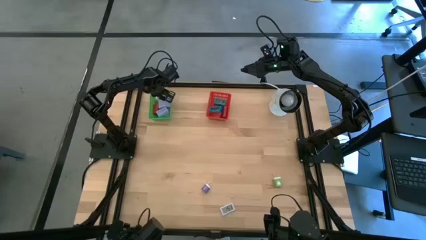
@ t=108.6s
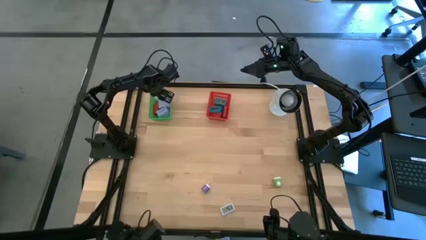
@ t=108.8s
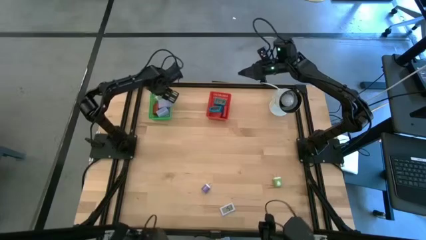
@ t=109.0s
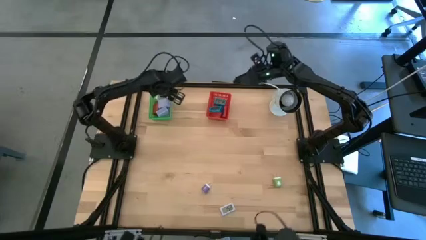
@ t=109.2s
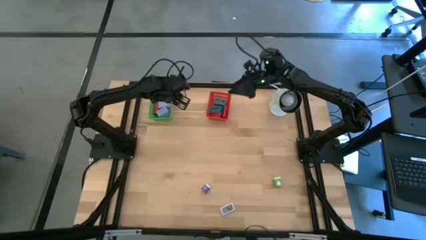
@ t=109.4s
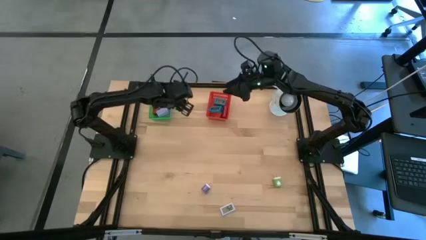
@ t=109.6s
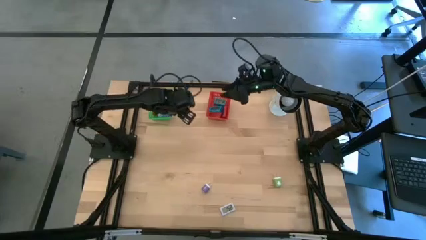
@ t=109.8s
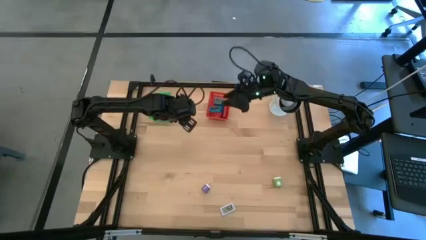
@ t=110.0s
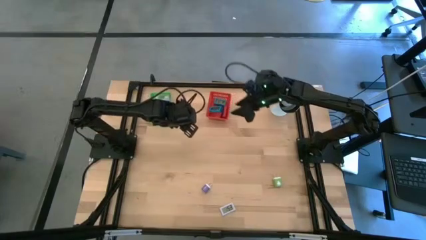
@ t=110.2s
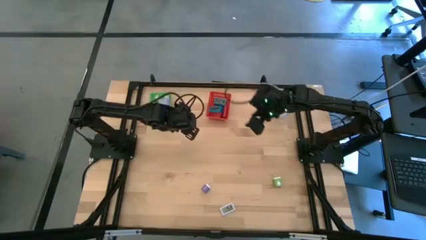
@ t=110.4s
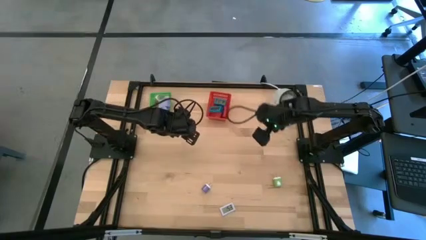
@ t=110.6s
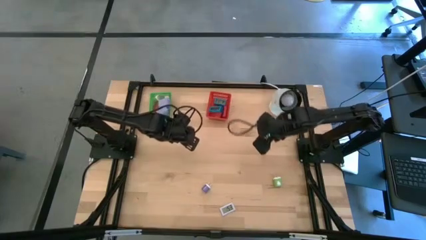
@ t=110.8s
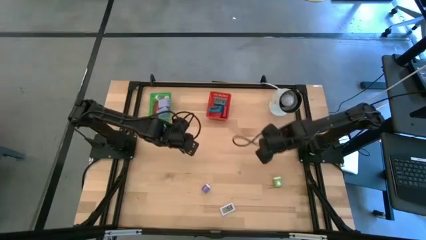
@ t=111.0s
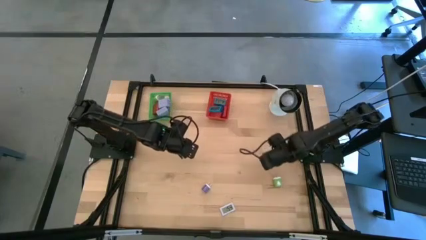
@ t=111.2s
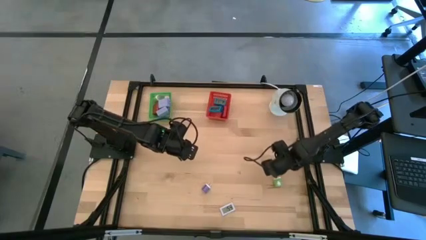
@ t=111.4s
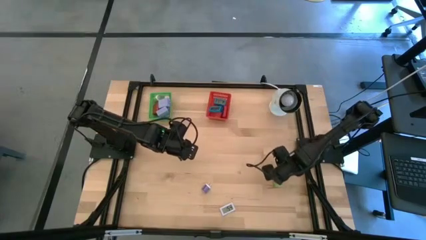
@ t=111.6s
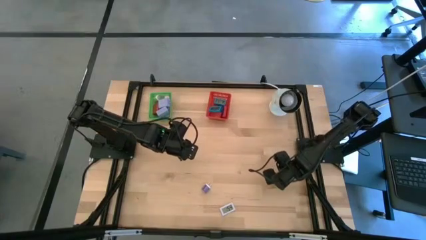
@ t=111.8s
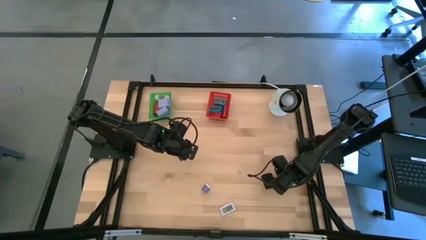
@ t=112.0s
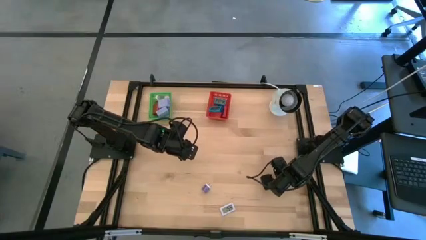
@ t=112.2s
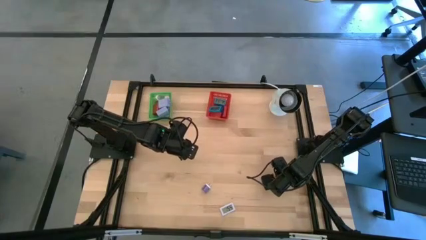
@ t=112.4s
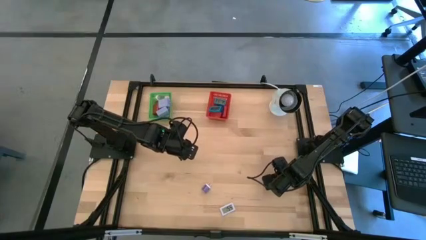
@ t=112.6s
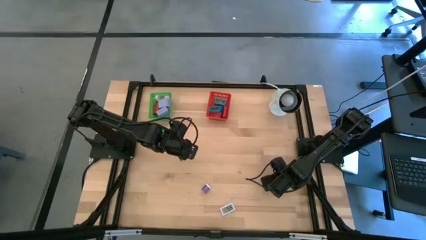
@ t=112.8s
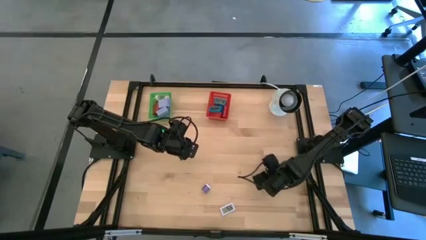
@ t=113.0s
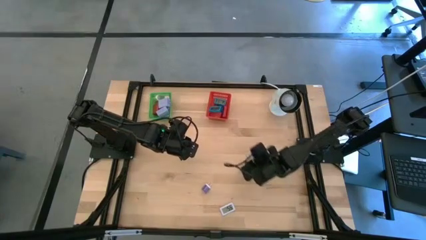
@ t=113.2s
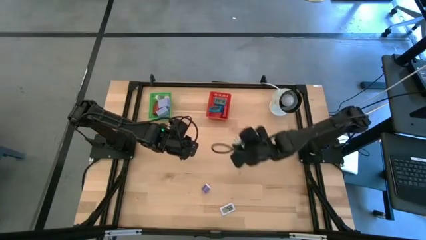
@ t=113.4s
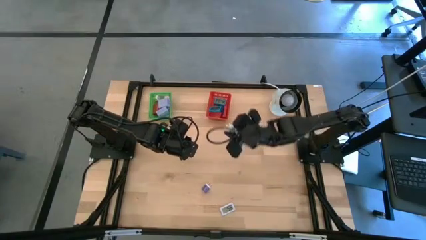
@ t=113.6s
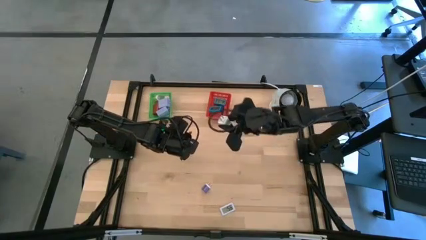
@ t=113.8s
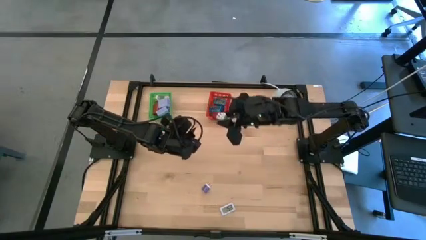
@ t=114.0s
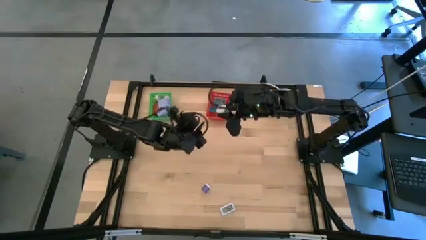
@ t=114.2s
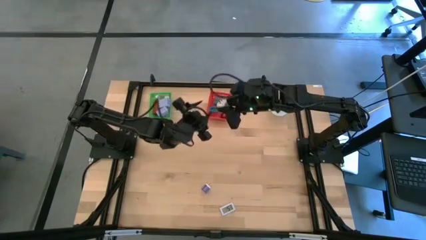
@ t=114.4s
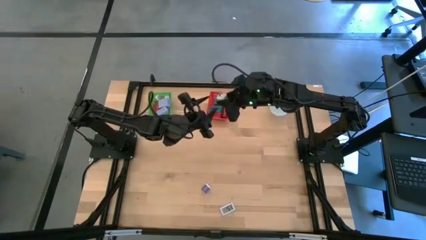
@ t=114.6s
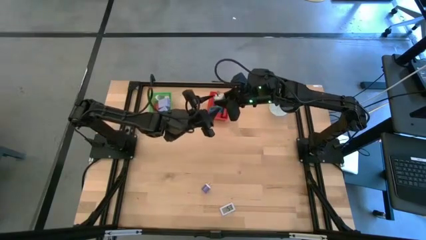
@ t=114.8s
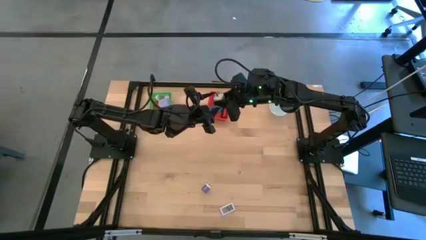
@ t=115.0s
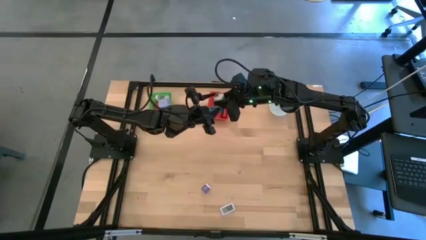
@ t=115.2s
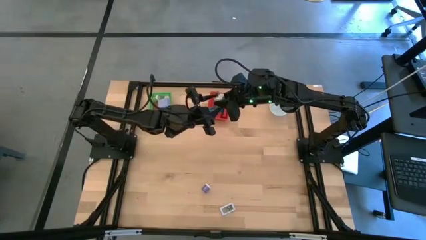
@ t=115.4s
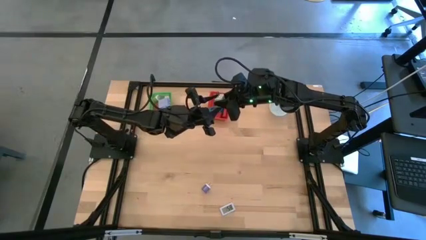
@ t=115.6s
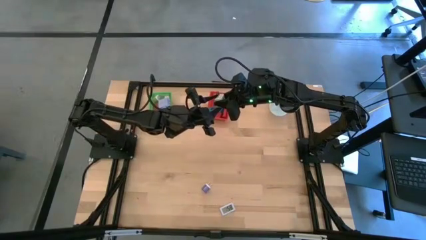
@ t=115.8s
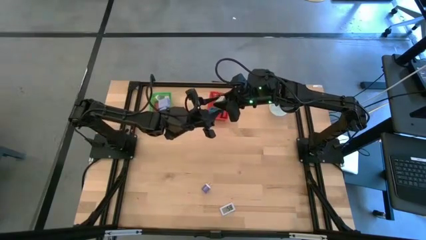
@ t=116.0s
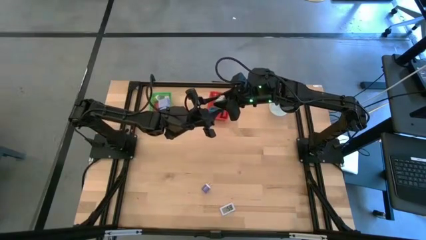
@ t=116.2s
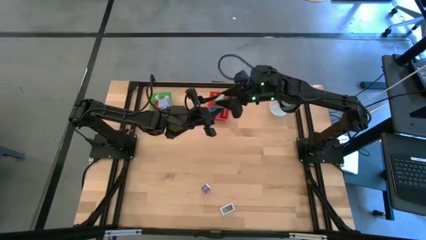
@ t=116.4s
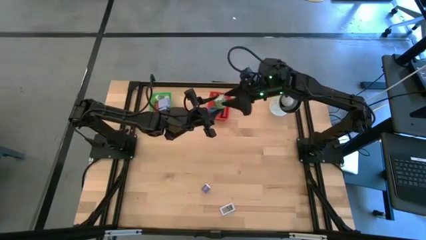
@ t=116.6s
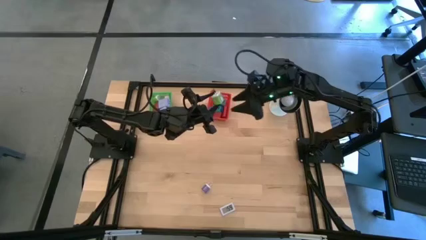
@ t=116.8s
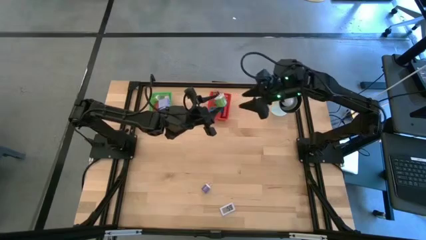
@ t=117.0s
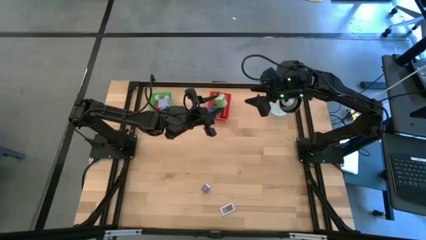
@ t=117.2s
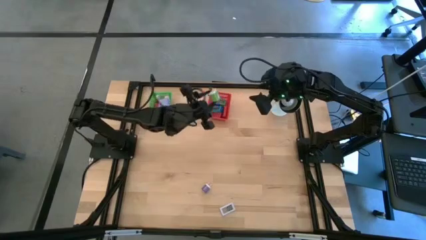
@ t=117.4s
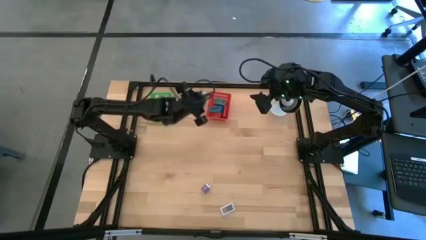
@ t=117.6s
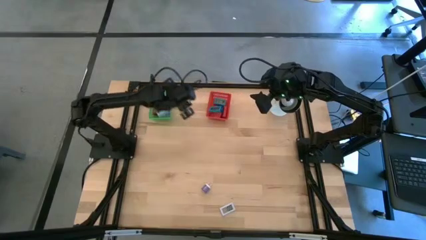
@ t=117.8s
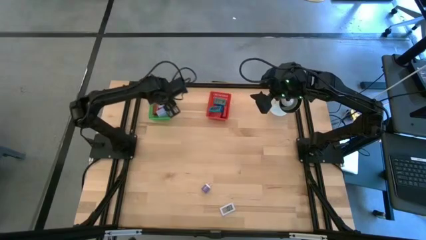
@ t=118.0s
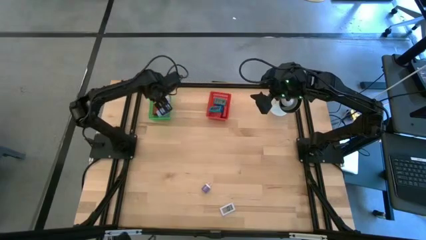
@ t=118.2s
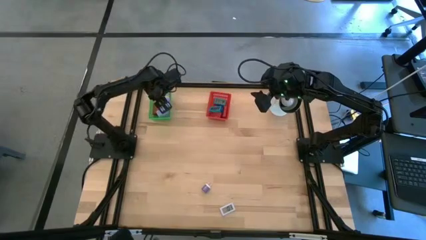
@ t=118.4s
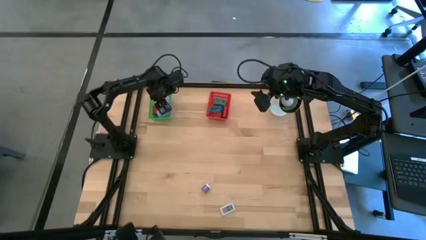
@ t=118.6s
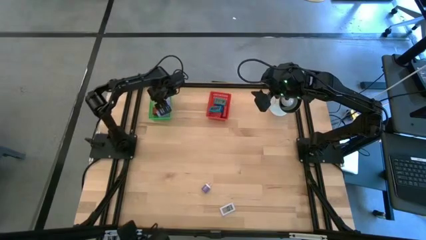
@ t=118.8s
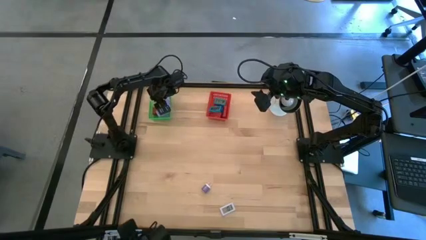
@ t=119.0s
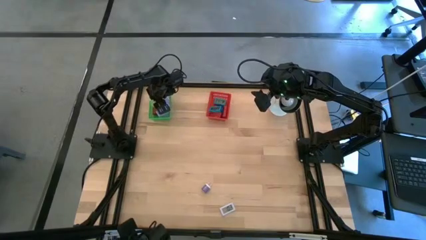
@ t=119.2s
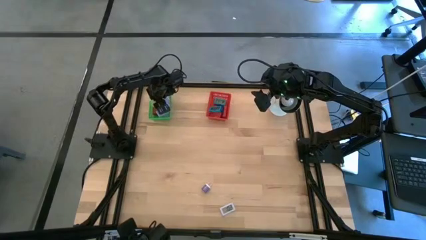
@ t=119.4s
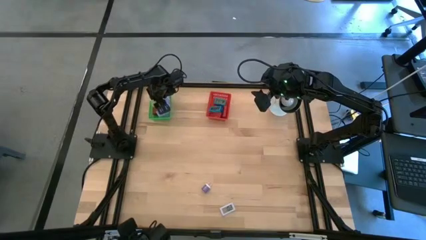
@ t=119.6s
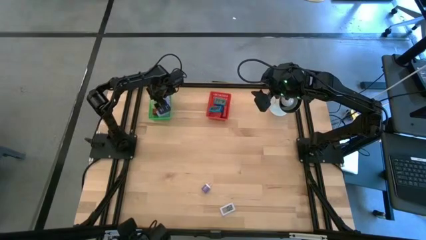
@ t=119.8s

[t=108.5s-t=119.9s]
Task: Pick & Place Office items
Put the green charger adapter into the green bin

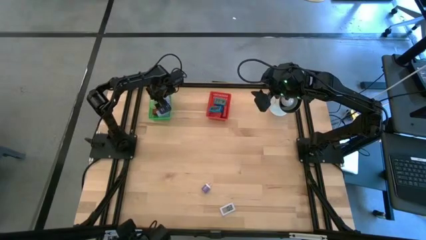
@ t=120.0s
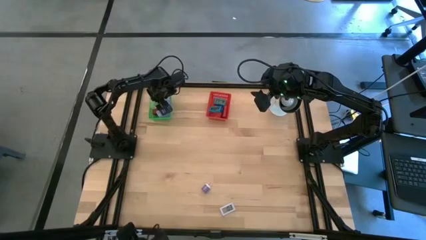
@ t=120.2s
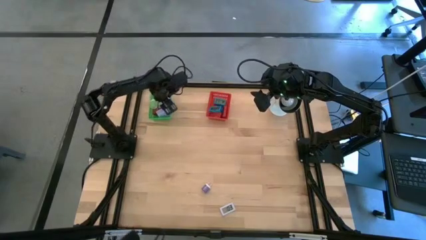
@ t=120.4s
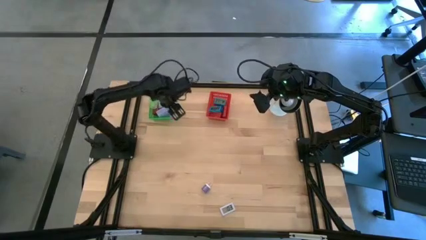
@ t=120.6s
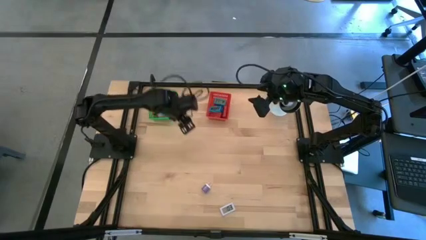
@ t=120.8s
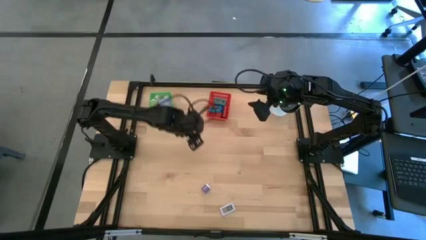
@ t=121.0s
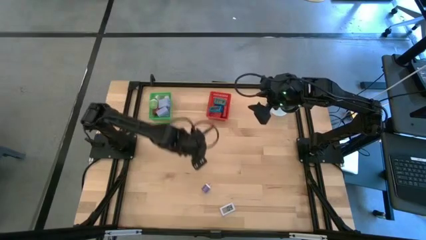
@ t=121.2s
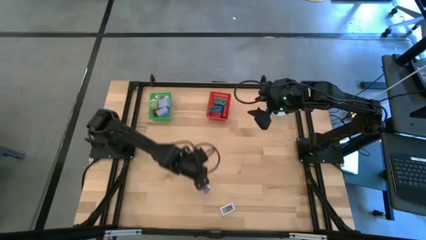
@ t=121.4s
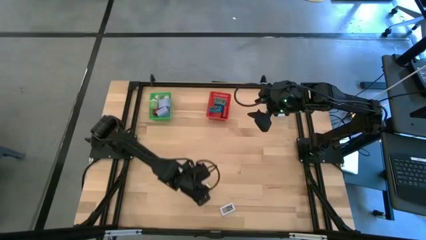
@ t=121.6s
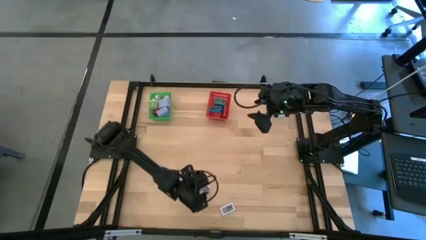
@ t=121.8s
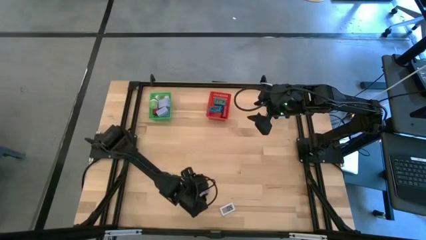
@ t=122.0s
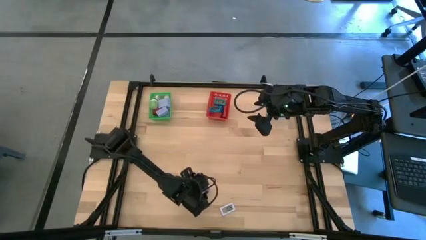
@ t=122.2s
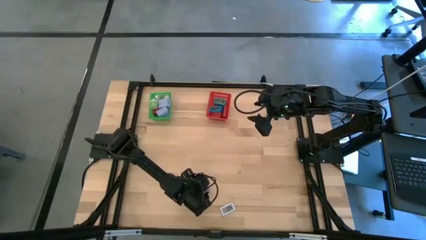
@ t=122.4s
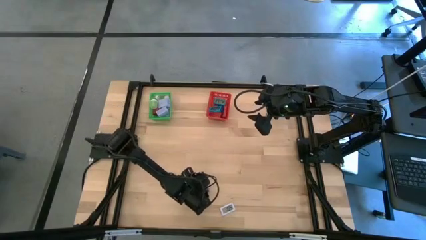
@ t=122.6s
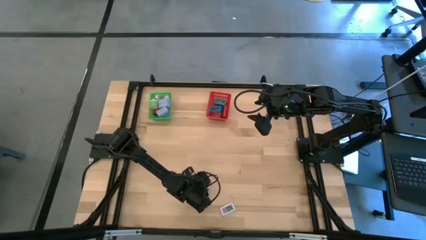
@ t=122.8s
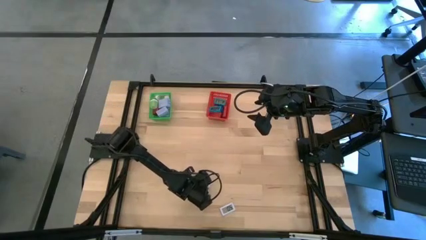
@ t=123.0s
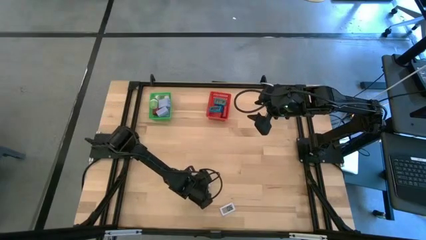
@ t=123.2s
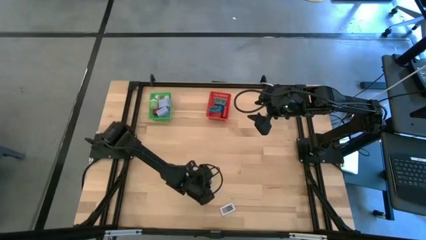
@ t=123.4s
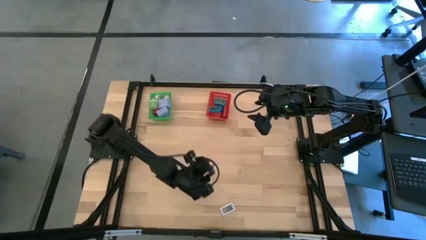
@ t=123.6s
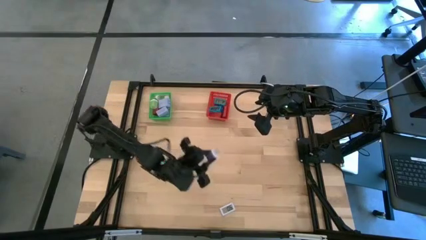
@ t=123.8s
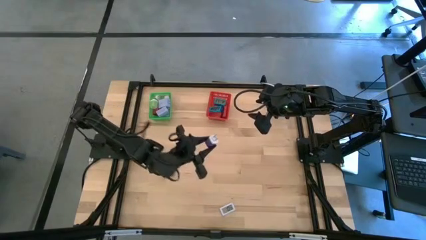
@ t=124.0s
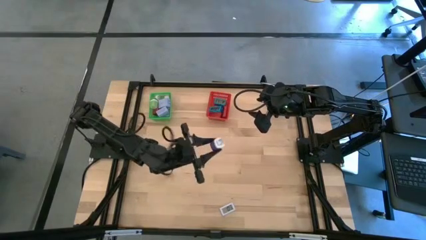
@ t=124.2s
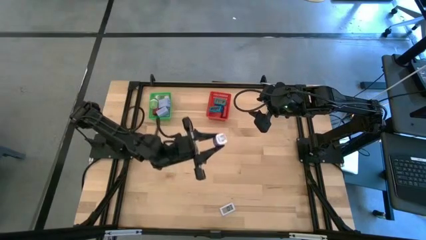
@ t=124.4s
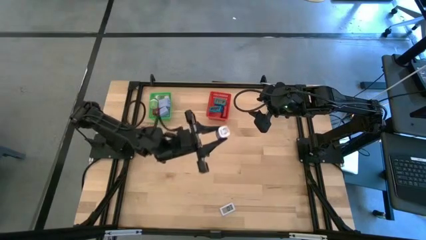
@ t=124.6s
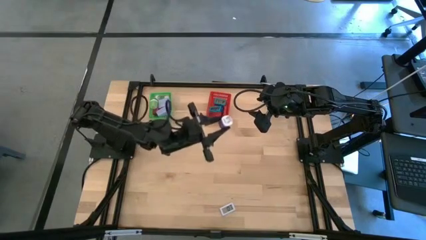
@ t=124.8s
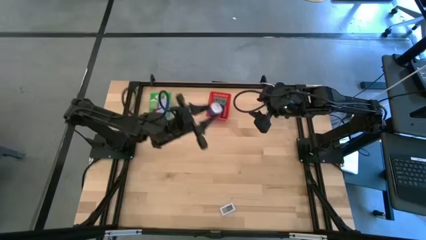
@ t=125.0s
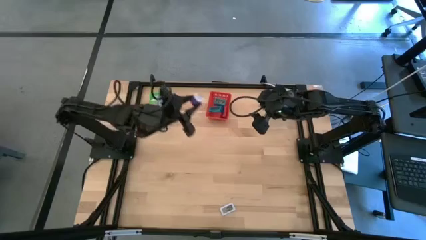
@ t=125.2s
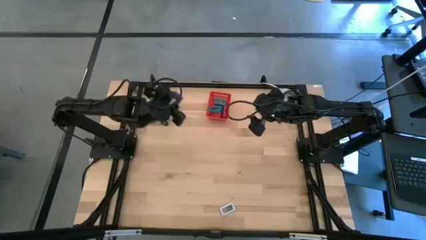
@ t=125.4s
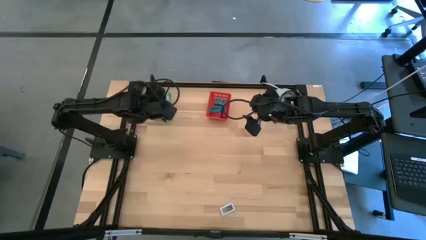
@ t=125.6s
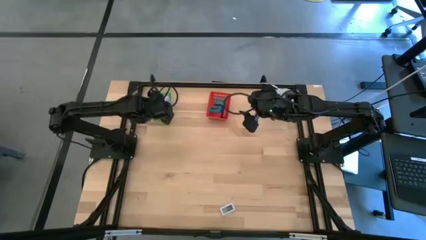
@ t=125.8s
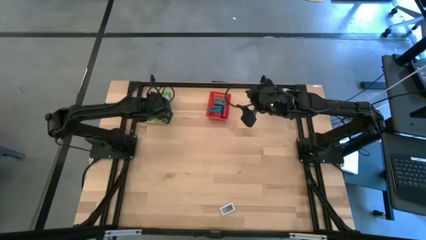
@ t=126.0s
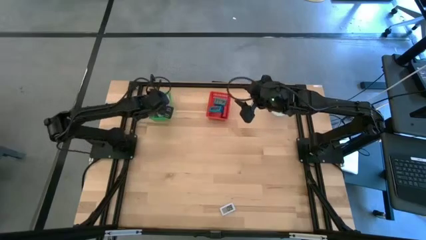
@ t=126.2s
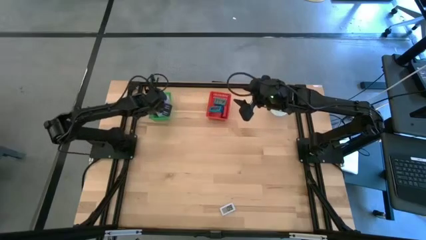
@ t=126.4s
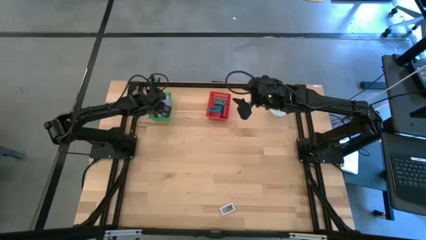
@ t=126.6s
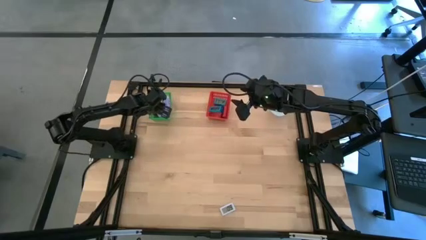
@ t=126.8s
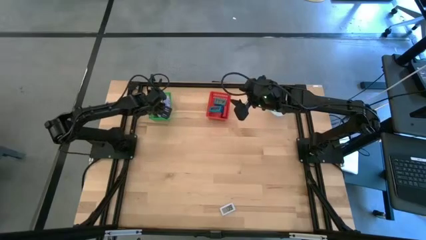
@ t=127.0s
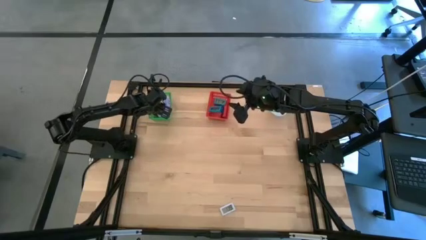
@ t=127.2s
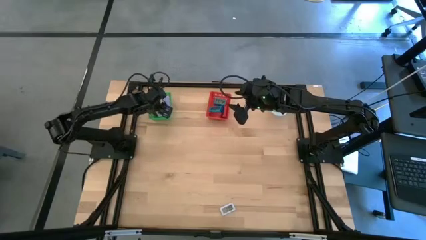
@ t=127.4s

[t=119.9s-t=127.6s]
Put the purple charger adapter into the green bin
